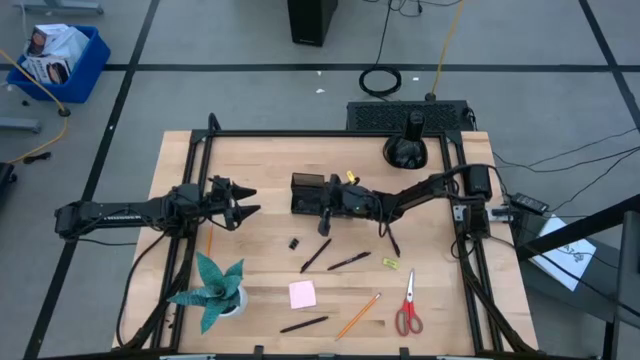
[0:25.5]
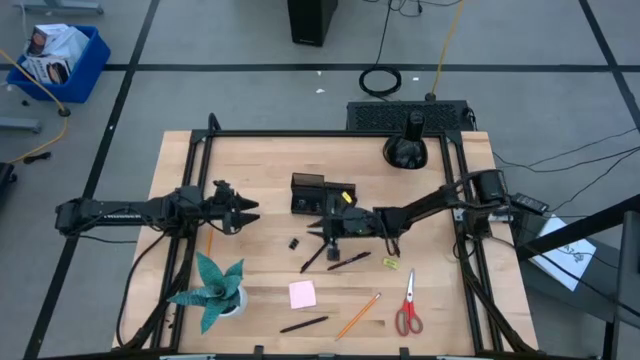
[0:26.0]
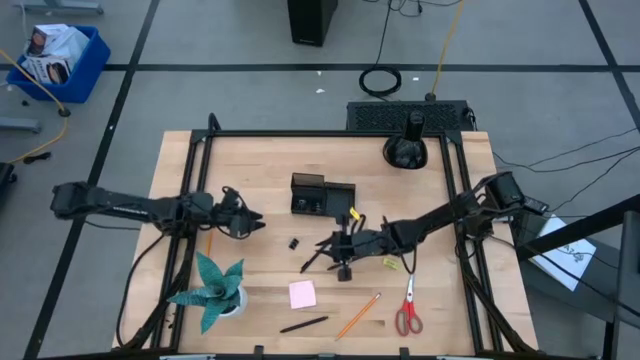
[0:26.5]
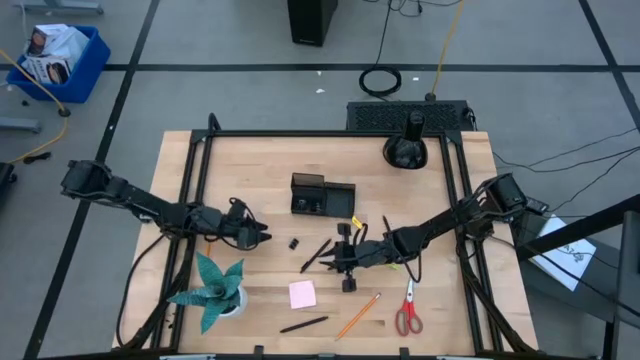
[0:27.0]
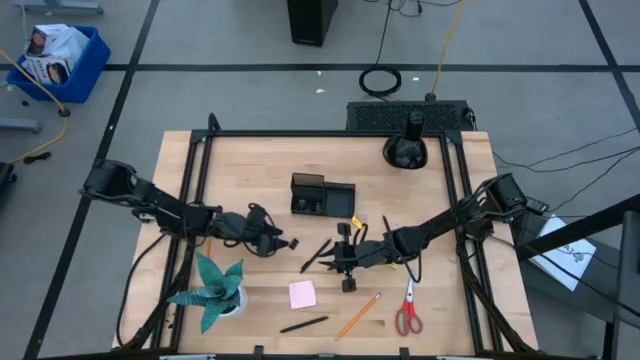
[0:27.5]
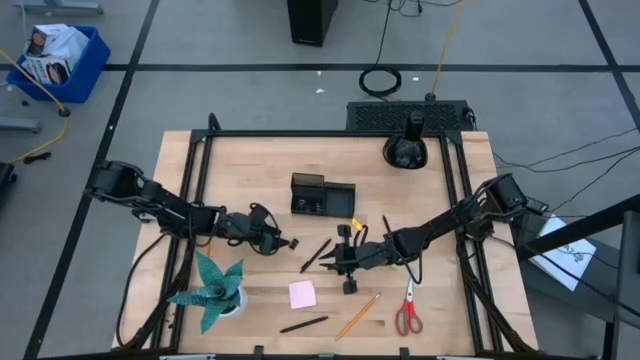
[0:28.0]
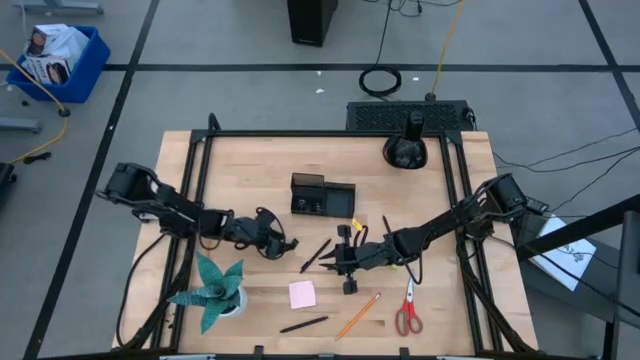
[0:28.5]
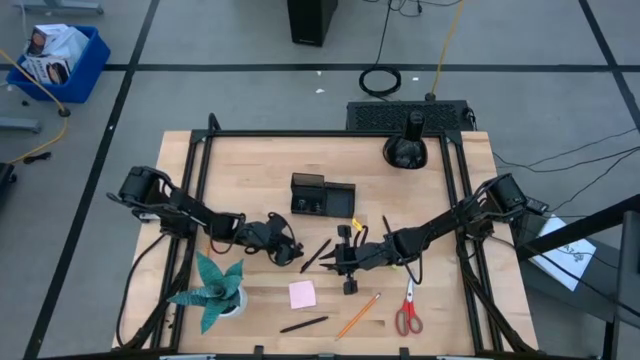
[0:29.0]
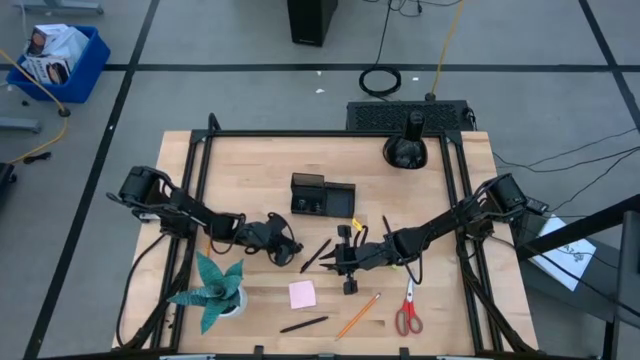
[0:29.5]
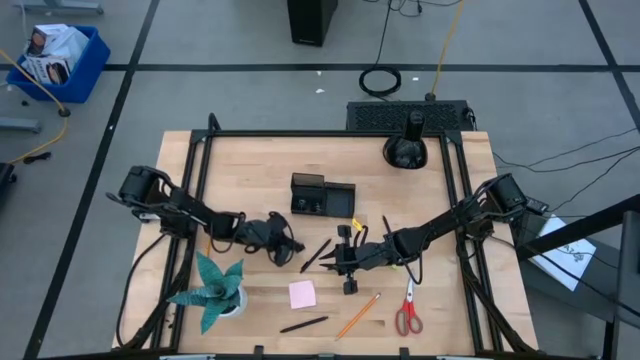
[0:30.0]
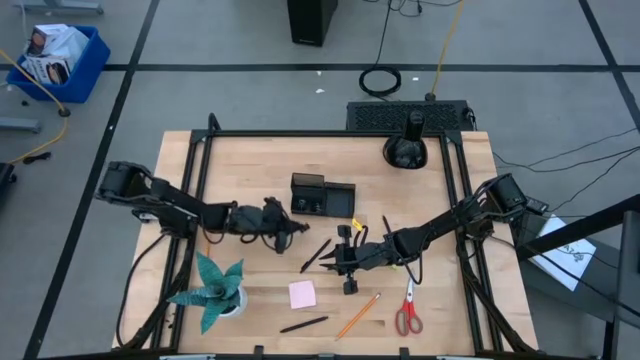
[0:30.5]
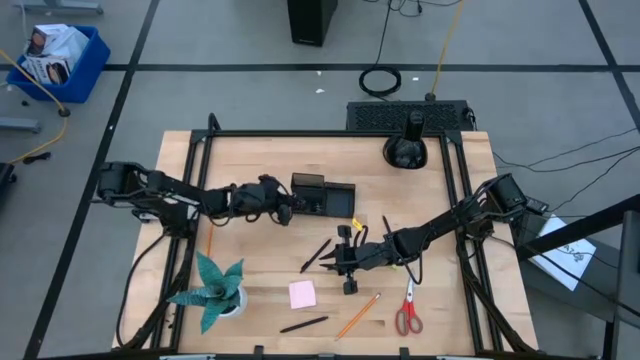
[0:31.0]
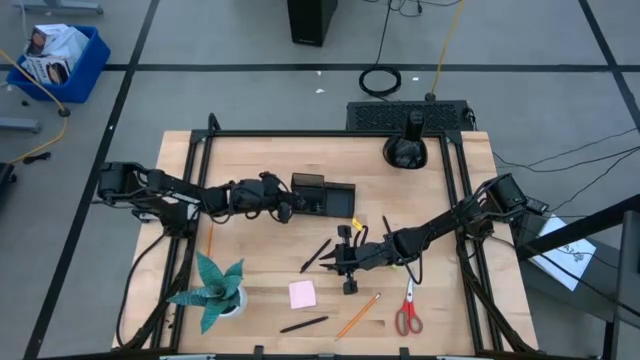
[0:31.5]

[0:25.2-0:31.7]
Task: Pick and place office supplies into organizer
Put the black binder clip into the black desk organizer

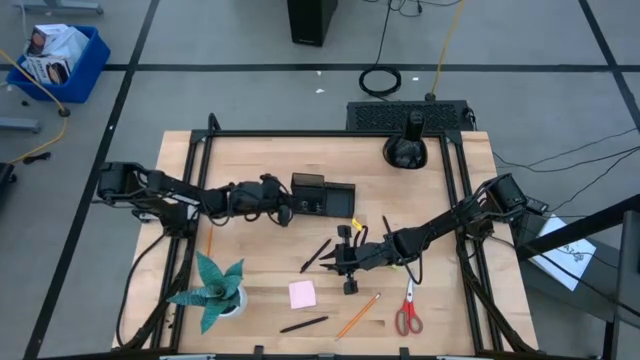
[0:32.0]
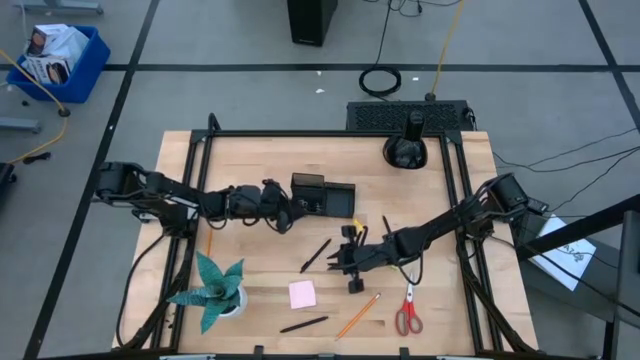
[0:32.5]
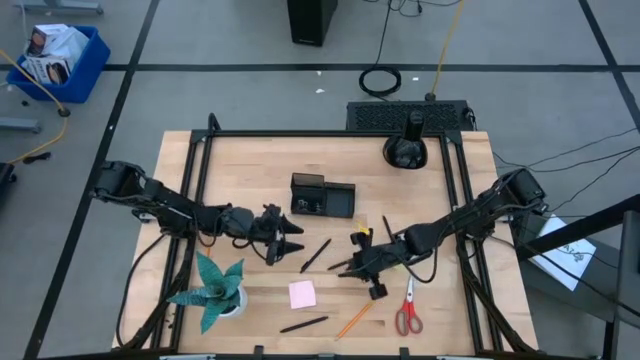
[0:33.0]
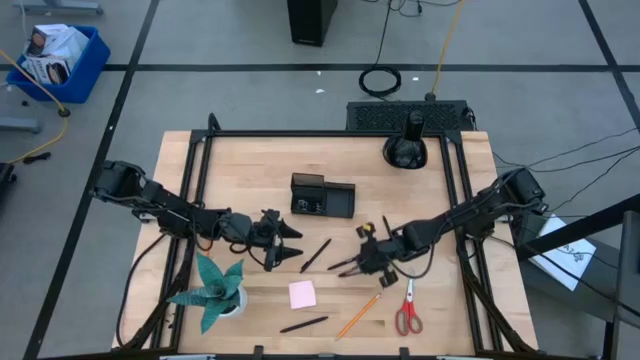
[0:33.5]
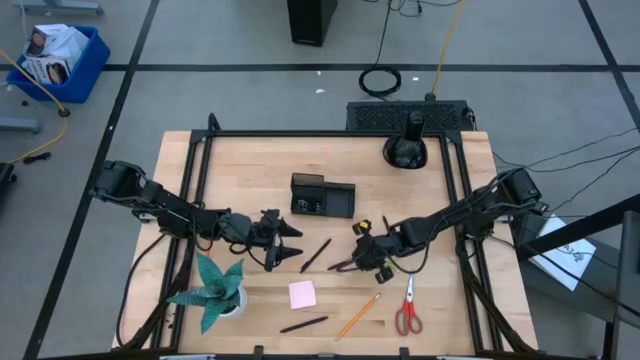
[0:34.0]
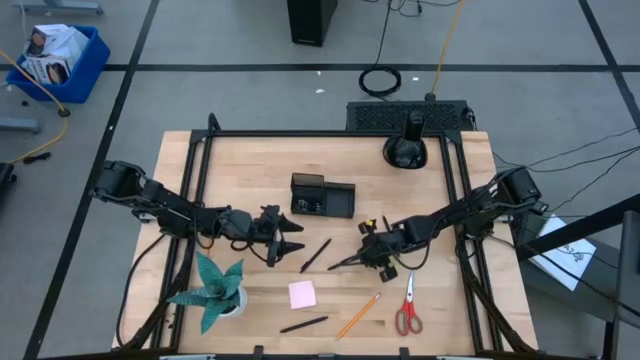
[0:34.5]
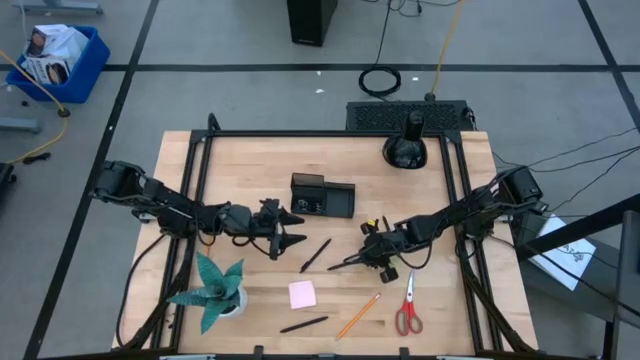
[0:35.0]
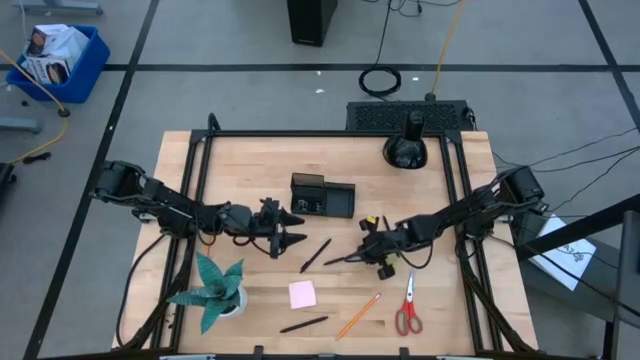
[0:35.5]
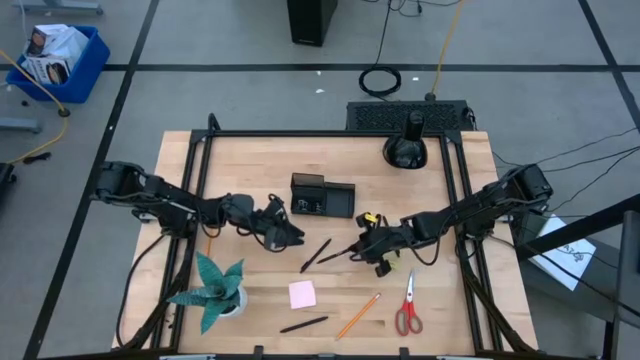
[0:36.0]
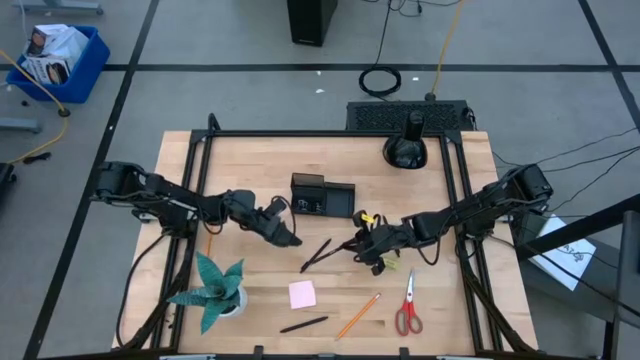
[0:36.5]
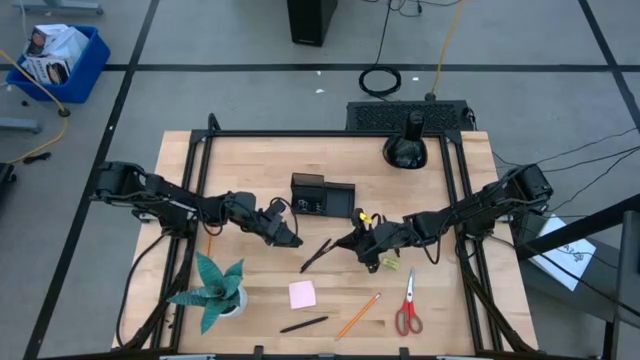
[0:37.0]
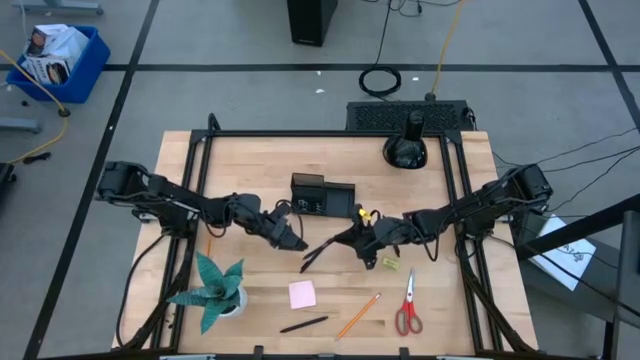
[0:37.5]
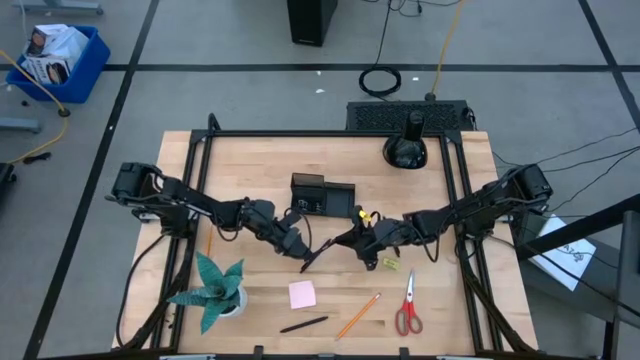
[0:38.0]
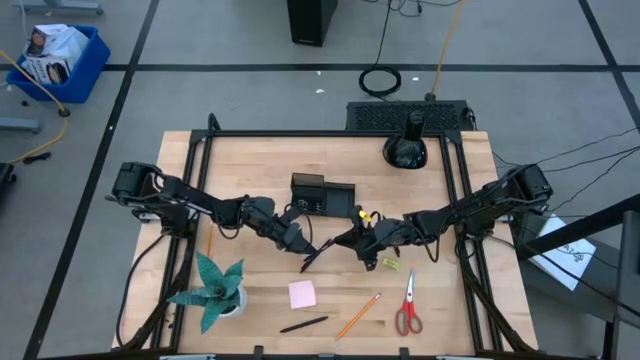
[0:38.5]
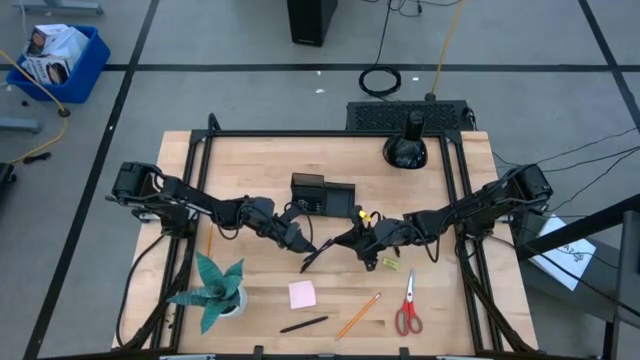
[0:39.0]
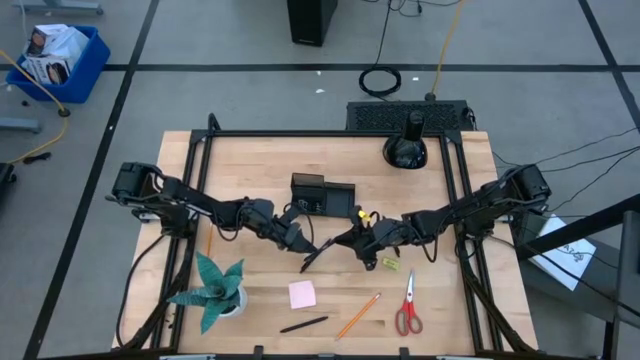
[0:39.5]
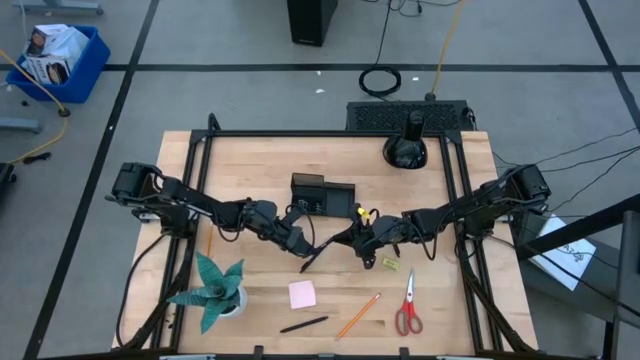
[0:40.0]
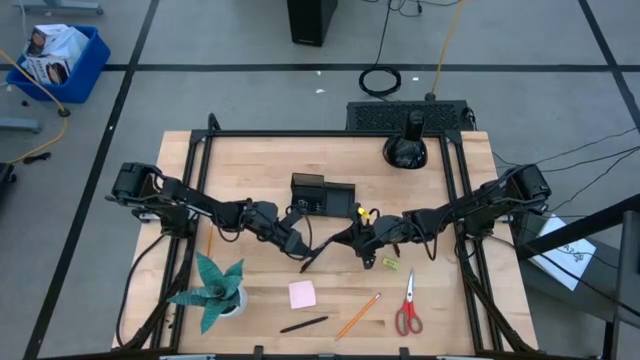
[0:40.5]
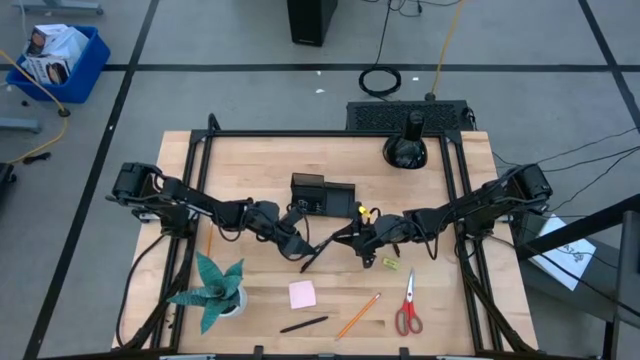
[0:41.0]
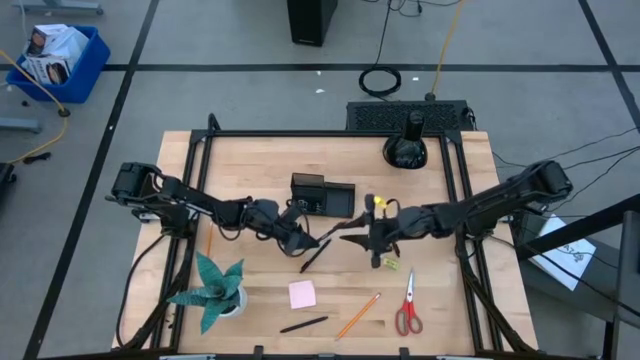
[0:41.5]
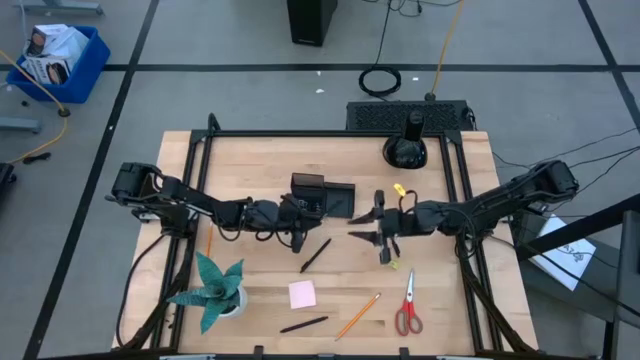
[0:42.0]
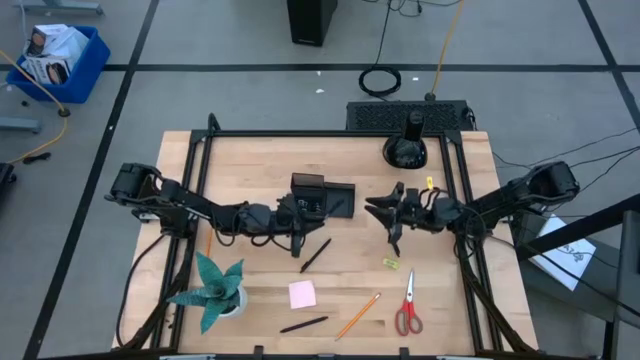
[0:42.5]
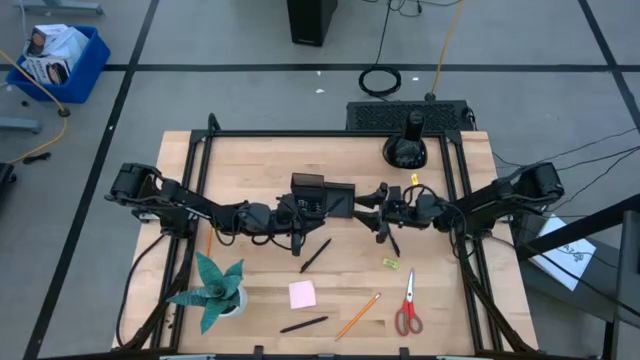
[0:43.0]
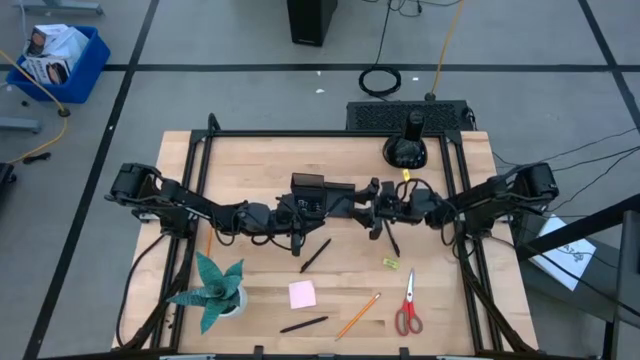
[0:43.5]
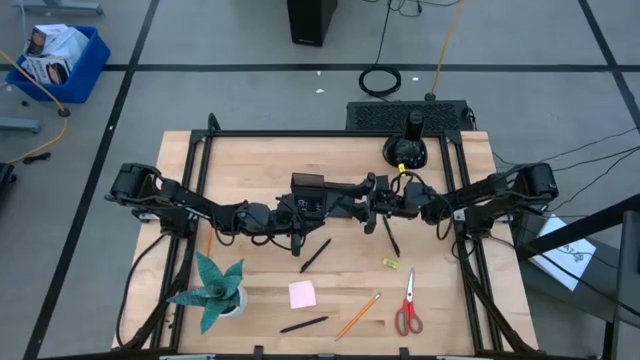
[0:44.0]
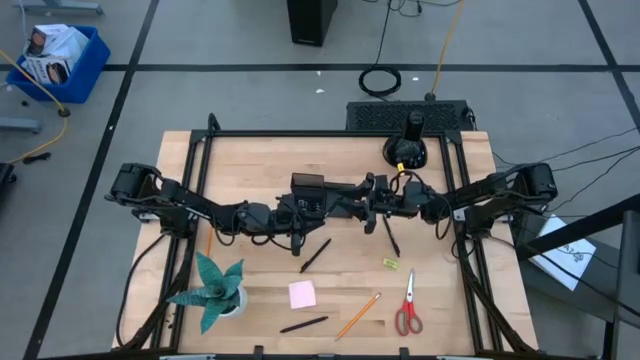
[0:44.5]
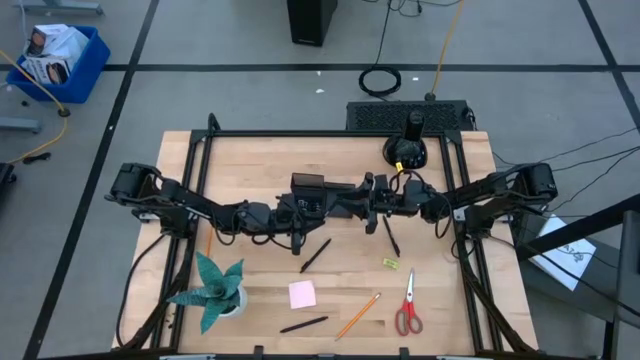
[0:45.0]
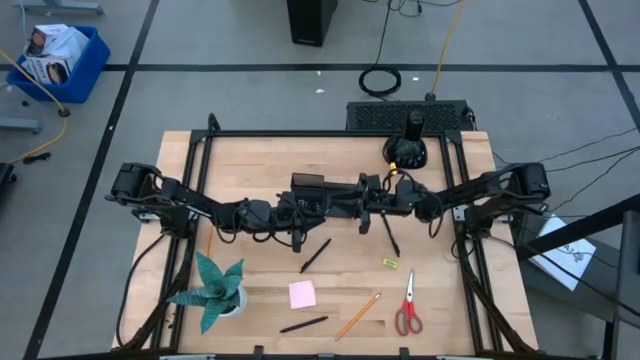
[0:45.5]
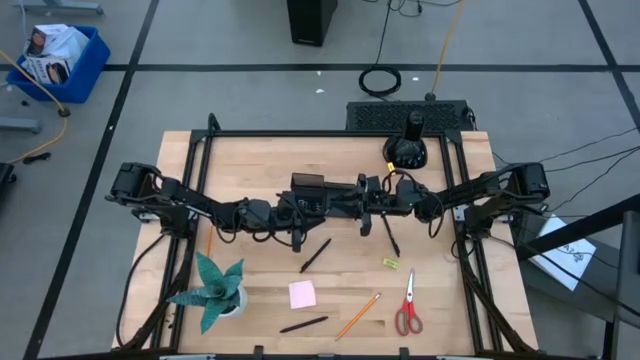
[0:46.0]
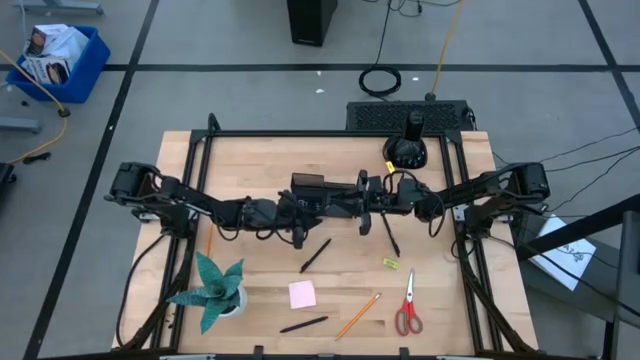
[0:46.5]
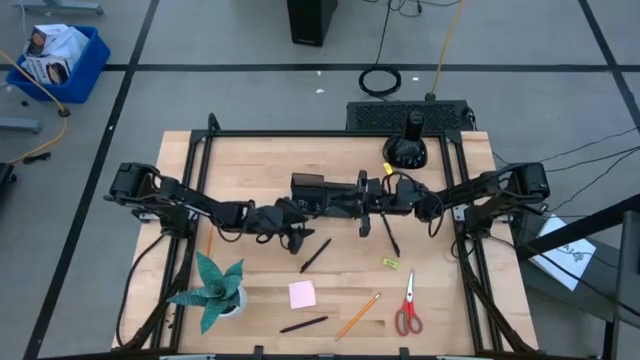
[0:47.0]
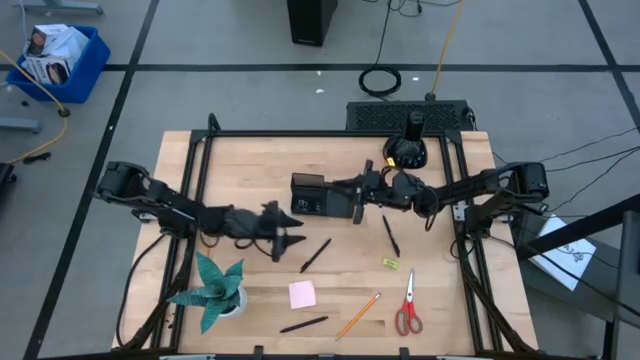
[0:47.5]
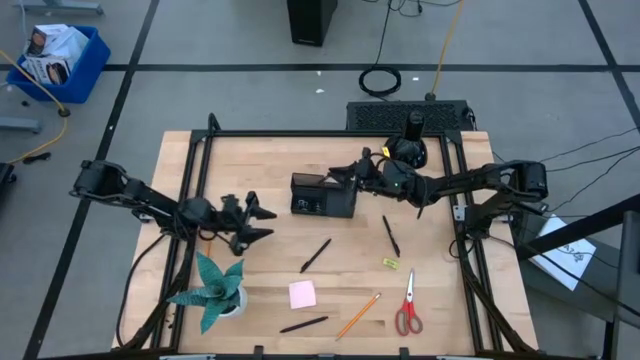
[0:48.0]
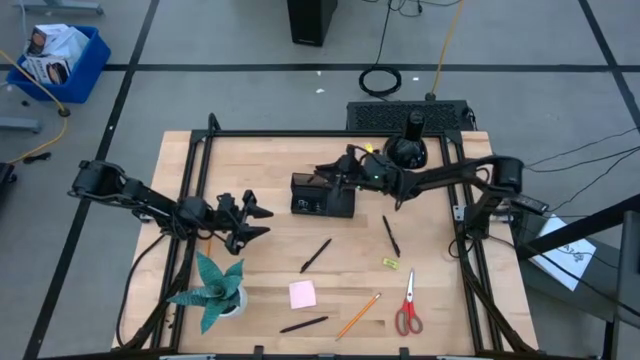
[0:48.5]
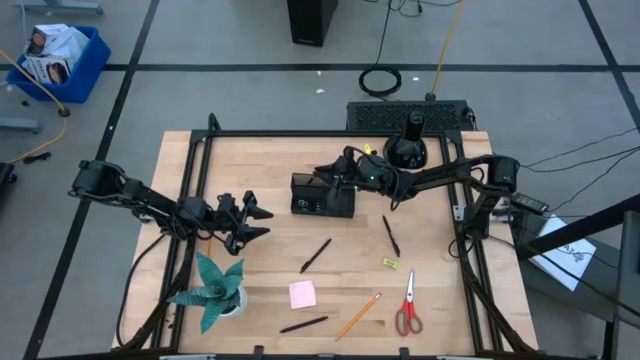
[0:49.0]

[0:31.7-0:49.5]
Put the black pen into the black desk organizer
